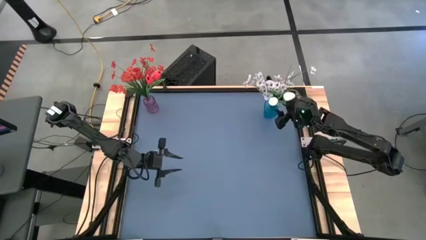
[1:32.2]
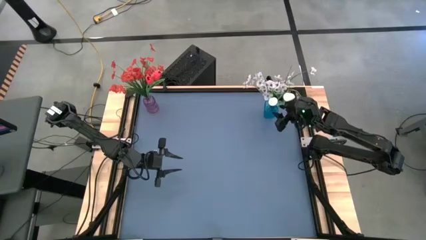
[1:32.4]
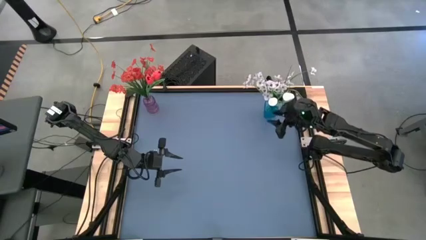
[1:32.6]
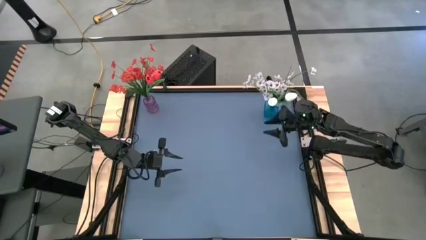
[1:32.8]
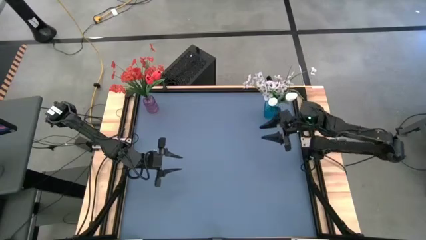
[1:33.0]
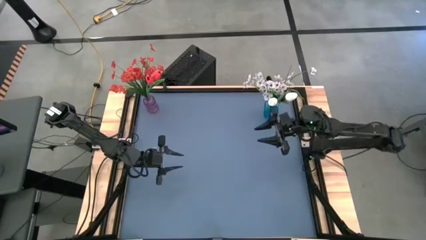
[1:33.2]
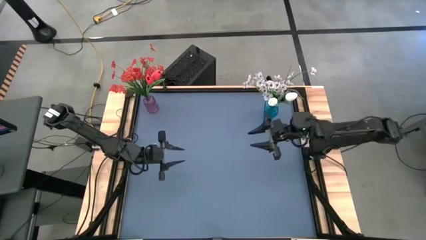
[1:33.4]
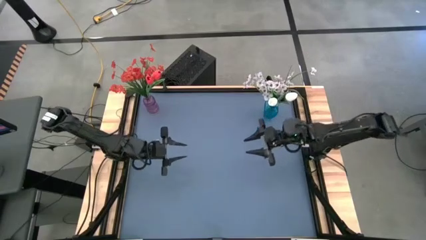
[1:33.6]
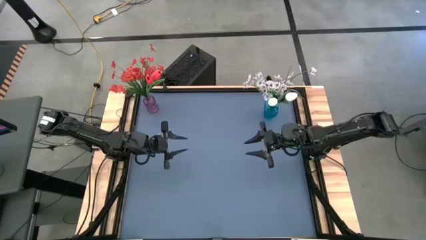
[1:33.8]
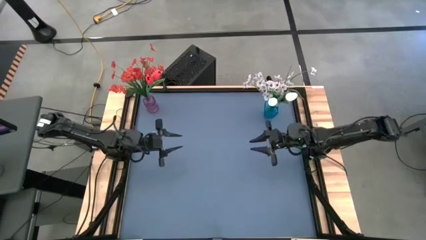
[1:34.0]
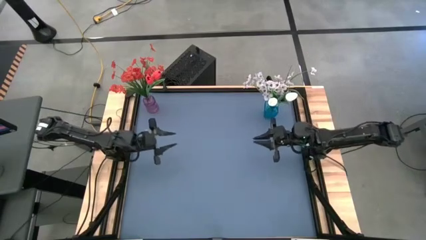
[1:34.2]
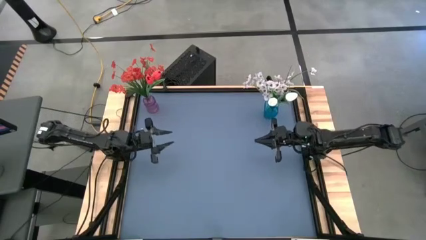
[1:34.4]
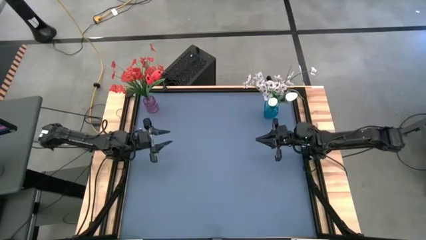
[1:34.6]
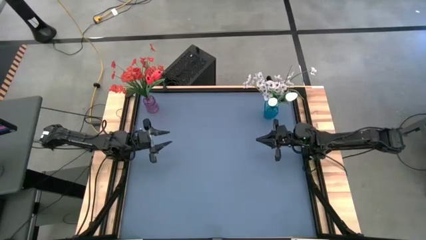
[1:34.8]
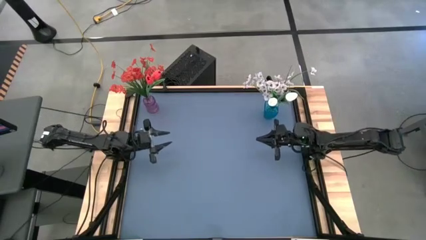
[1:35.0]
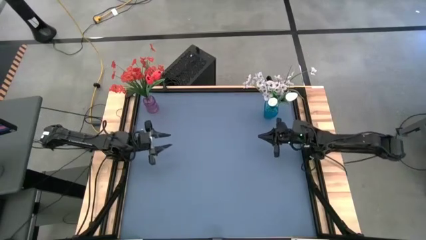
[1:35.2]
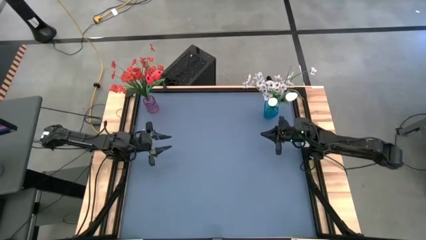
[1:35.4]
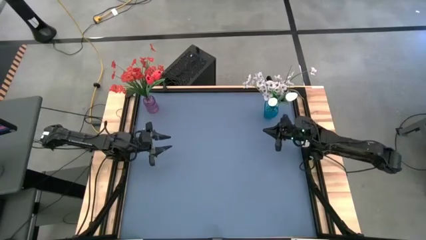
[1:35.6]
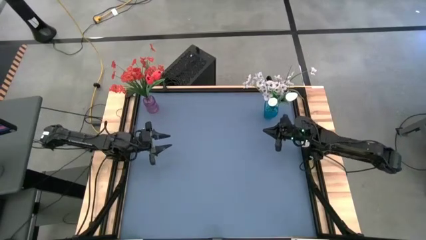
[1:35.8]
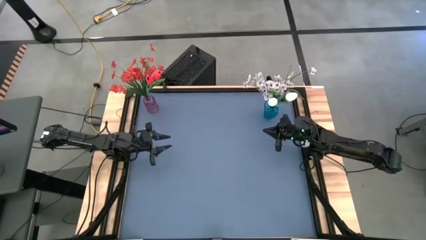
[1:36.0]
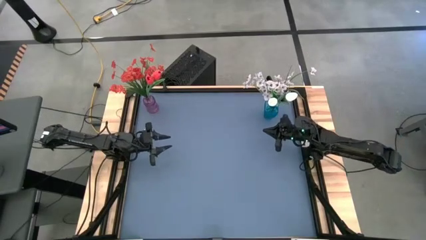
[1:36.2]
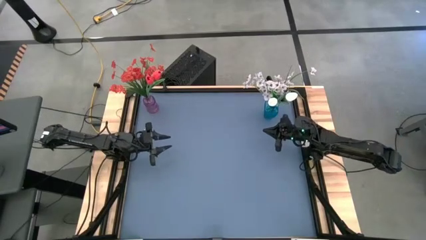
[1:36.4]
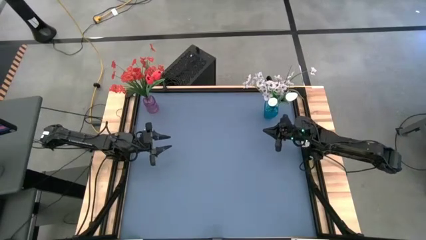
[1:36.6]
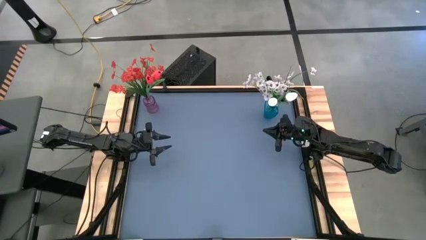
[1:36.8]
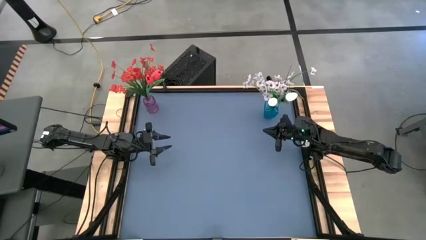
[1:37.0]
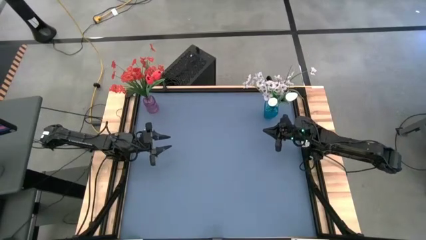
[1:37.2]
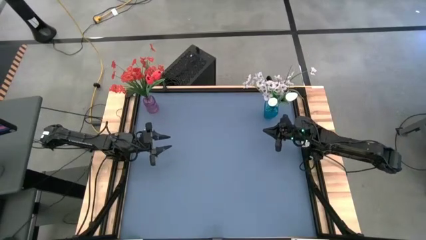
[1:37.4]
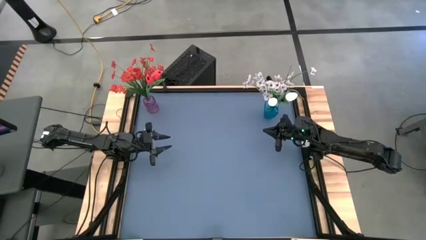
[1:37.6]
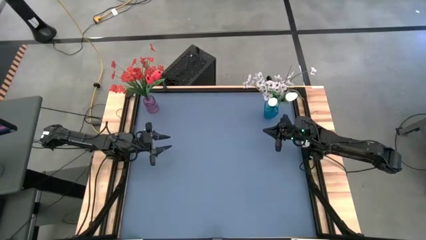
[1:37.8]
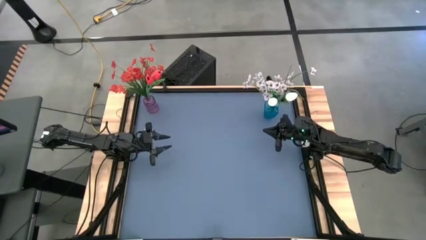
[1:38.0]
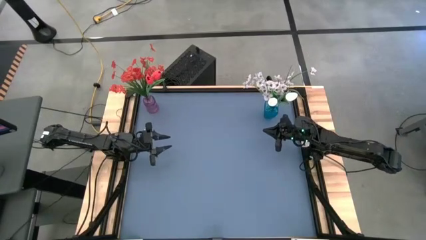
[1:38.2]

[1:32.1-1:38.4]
Task: Sort flowers into vase by color
Return to Home Position

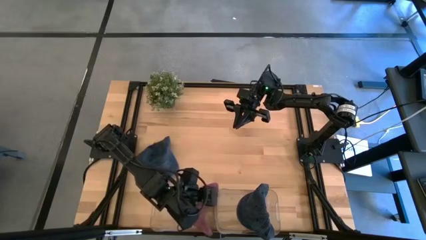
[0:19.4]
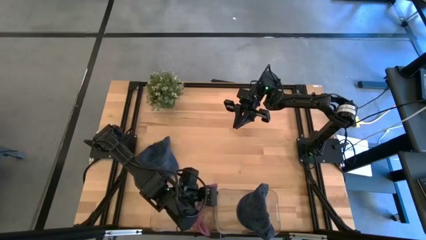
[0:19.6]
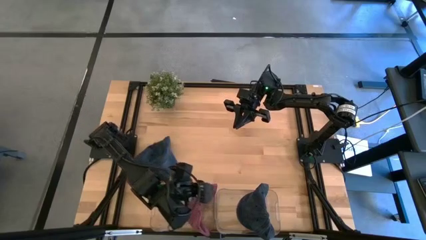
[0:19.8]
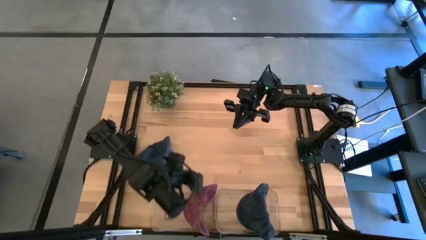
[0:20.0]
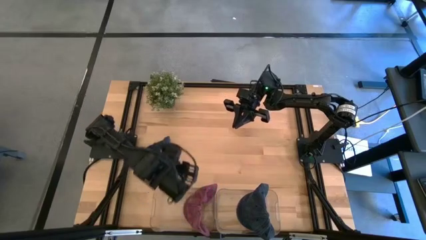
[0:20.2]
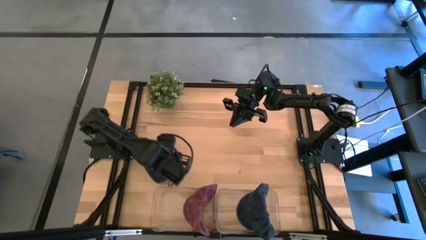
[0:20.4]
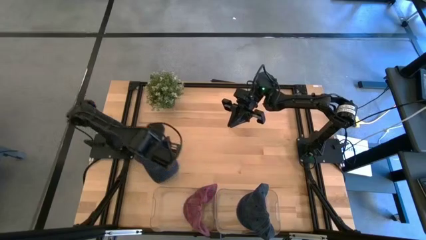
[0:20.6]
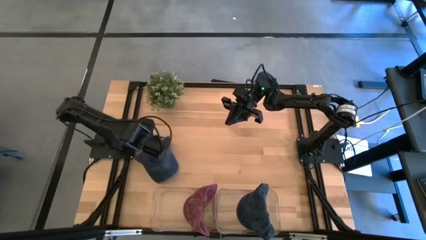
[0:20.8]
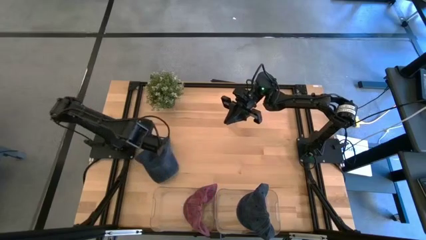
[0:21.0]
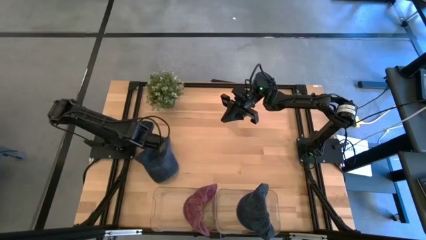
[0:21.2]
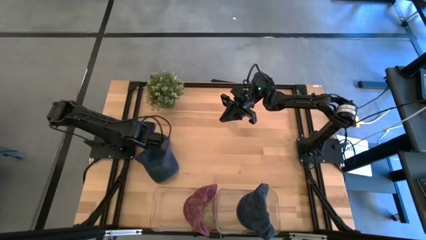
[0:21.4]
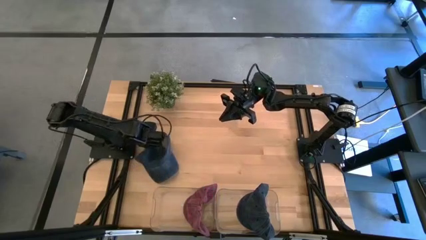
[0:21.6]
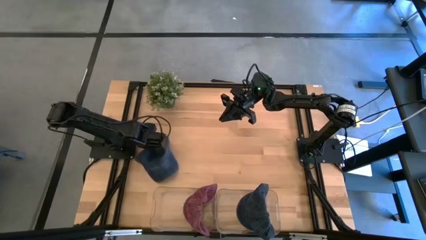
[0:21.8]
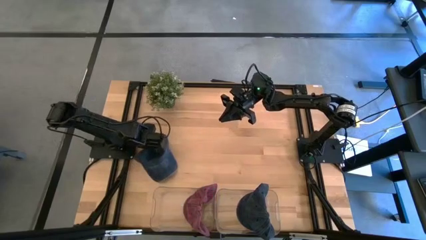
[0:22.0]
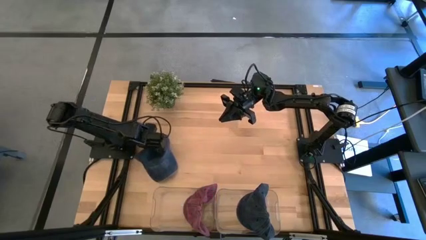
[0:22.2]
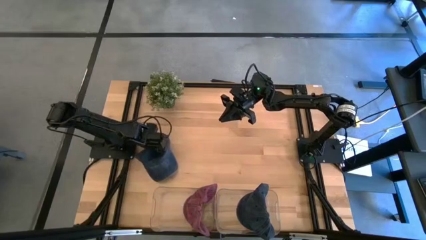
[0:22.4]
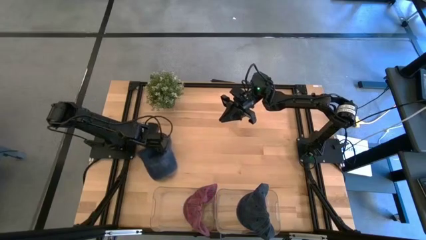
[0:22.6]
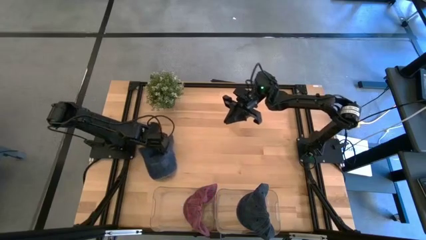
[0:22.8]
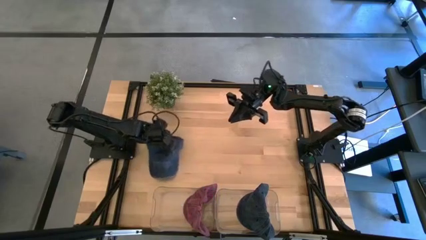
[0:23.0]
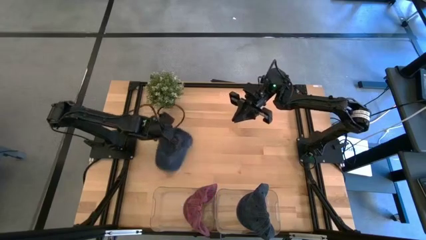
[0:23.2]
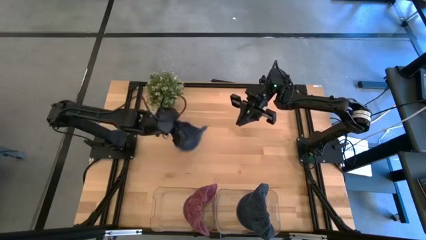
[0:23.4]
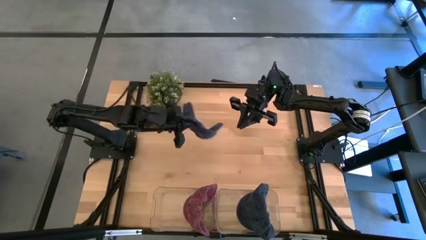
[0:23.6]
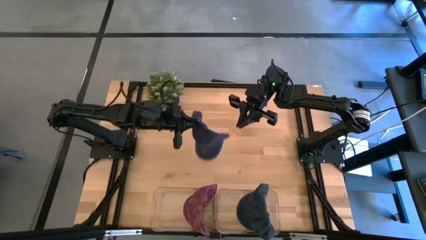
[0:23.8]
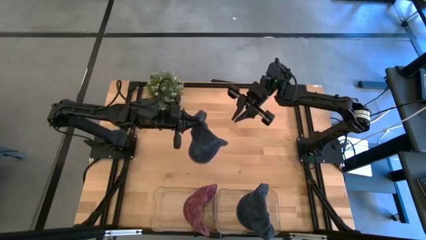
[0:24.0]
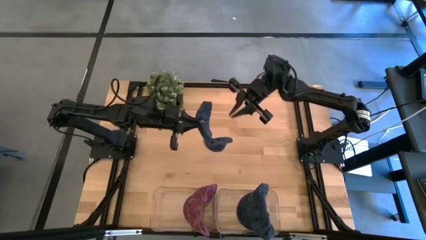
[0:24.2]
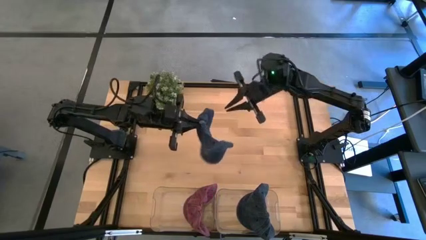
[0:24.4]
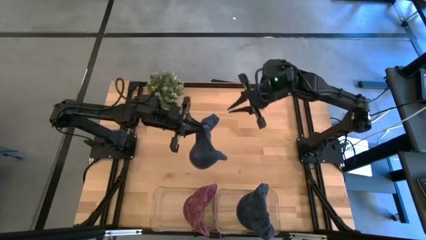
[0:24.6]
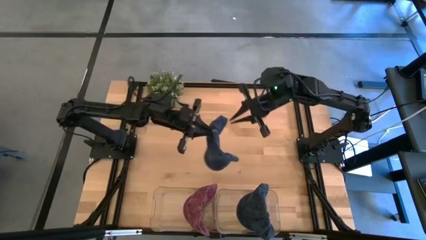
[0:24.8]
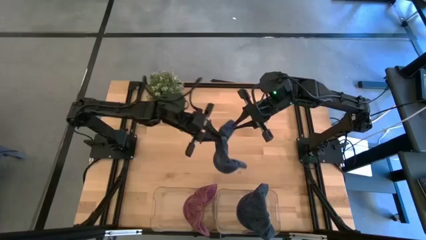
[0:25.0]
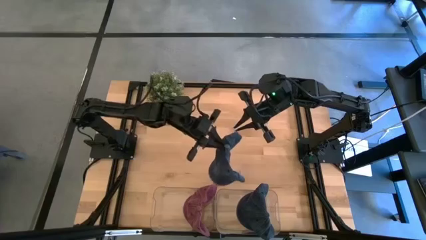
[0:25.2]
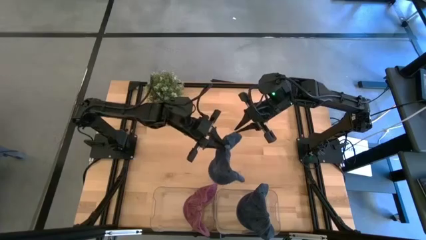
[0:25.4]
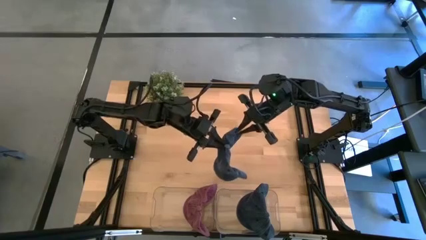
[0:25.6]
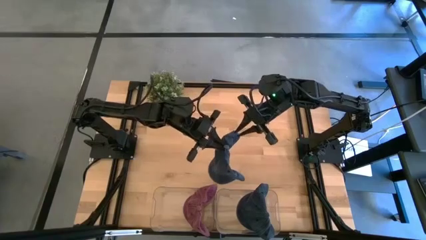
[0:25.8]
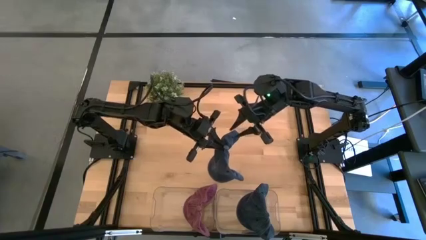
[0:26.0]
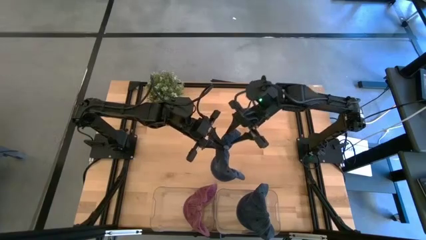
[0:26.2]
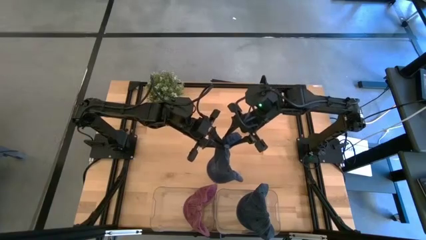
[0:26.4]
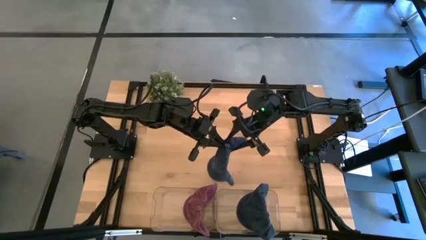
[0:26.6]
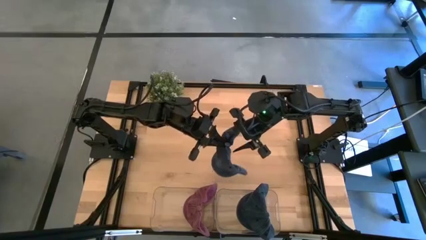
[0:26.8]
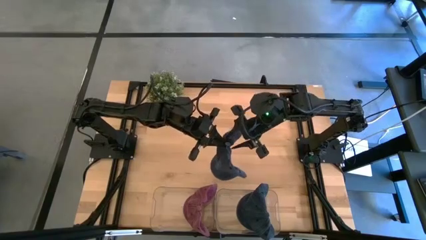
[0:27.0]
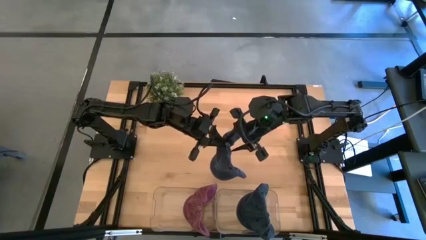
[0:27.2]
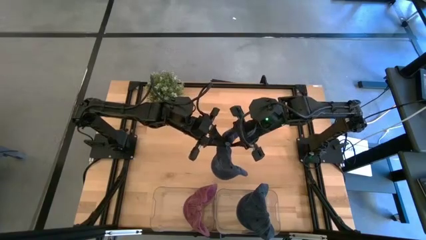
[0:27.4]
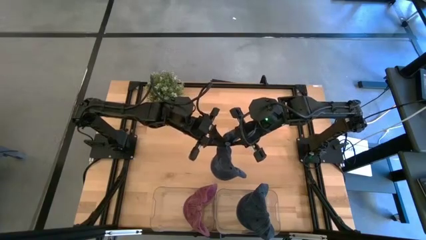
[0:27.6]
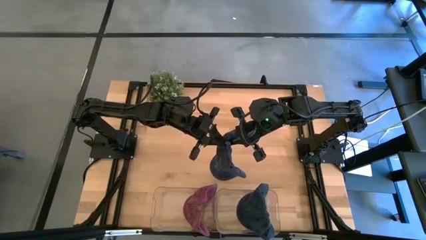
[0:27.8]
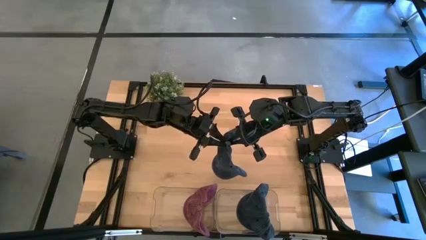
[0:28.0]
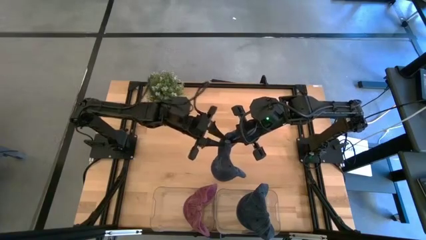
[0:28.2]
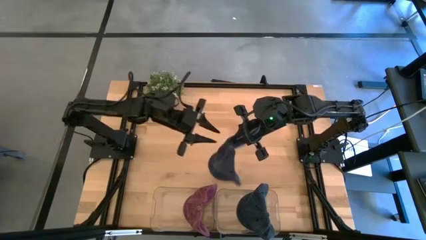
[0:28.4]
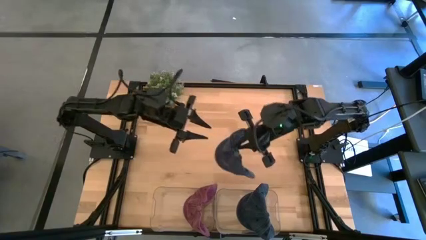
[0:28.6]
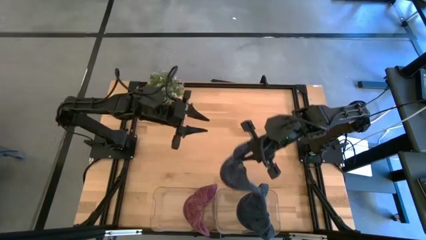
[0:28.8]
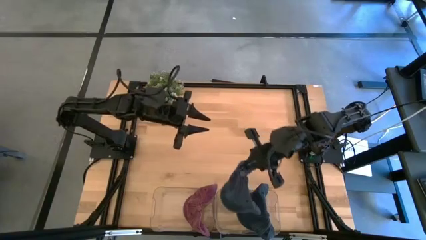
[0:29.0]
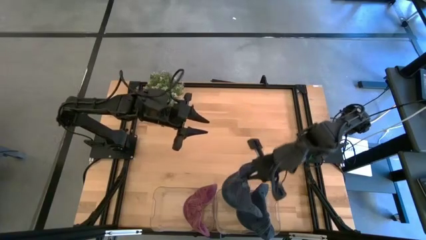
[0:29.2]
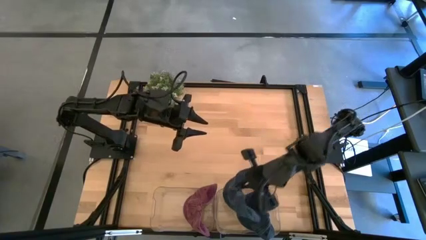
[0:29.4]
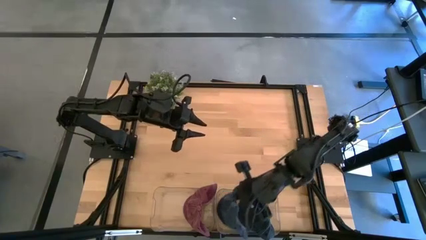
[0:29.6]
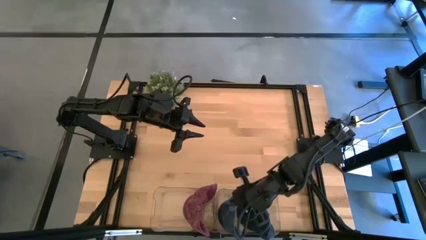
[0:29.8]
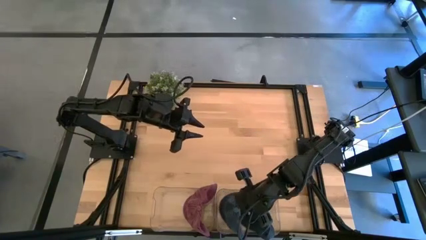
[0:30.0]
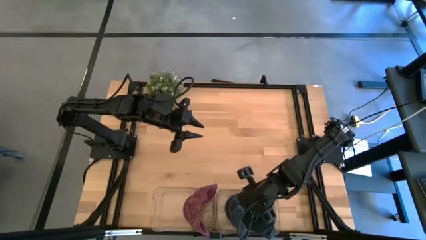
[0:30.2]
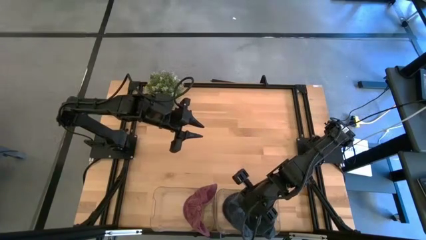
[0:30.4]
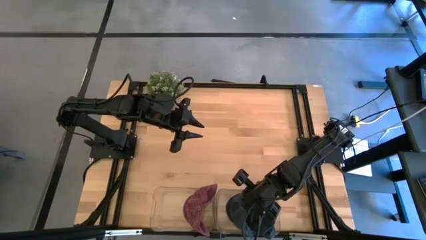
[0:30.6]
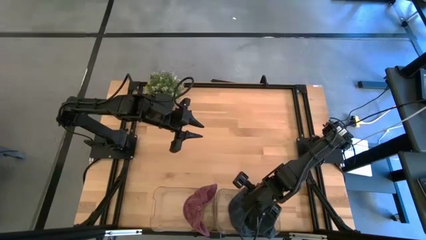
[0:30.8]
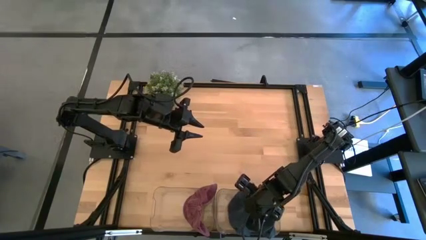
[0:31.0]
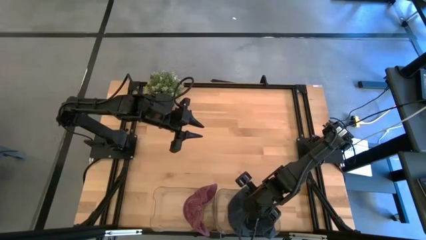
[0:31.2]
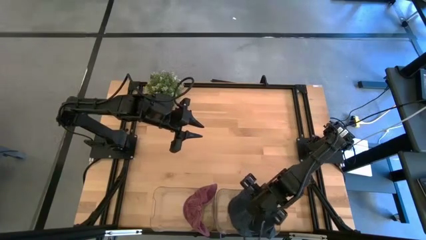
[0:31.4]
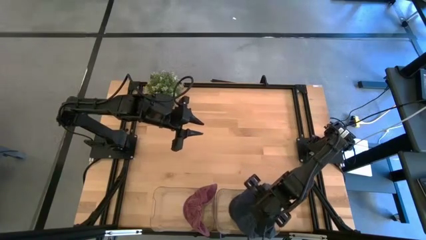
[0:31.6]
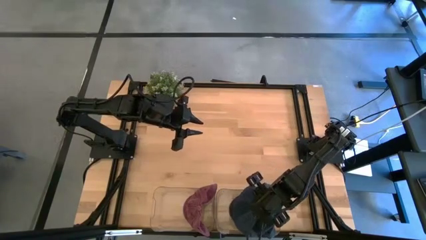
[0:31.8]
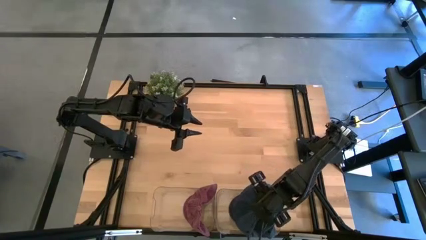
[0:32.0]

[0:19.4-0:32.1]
Task: Pick & Place hat
Put the black cap into the right transparent bin
